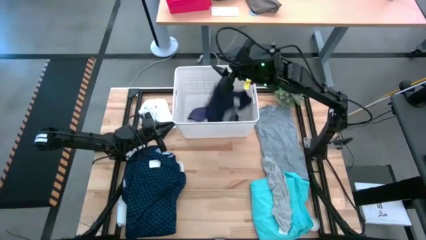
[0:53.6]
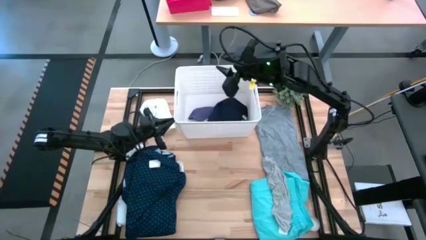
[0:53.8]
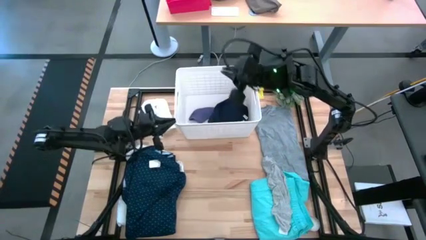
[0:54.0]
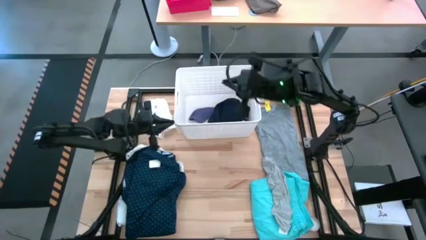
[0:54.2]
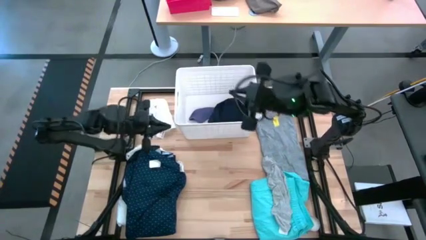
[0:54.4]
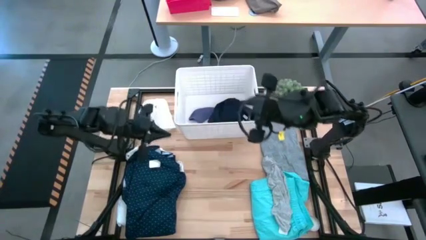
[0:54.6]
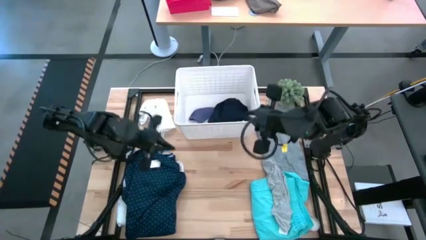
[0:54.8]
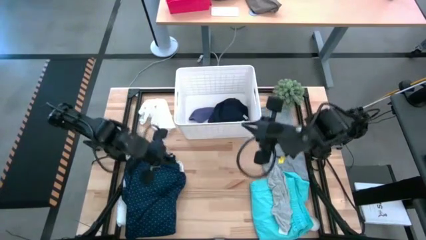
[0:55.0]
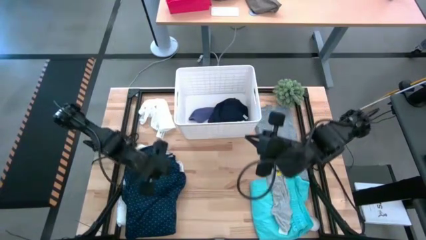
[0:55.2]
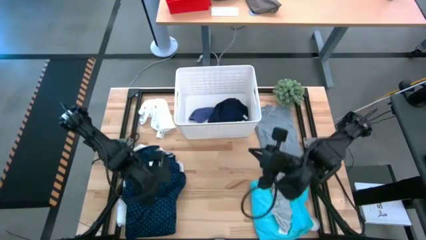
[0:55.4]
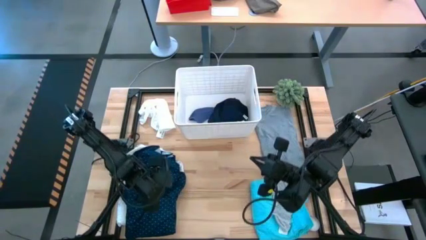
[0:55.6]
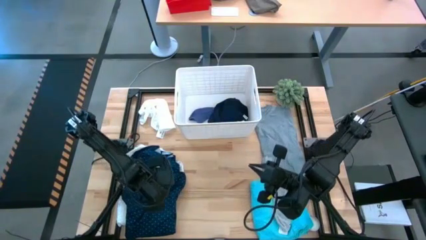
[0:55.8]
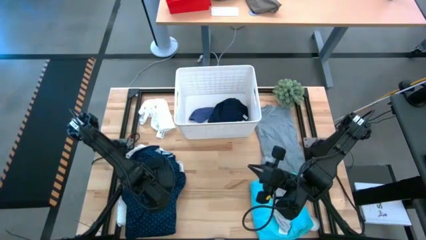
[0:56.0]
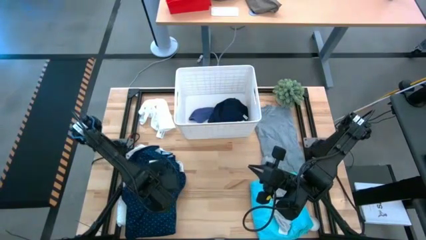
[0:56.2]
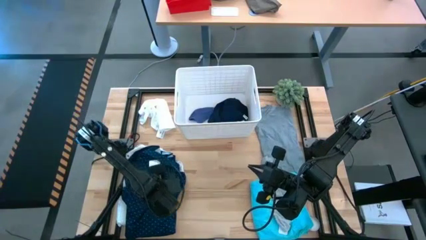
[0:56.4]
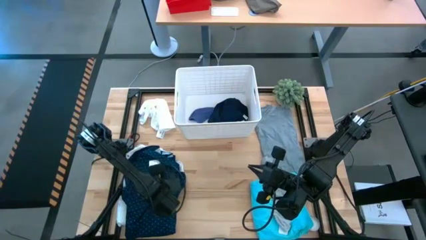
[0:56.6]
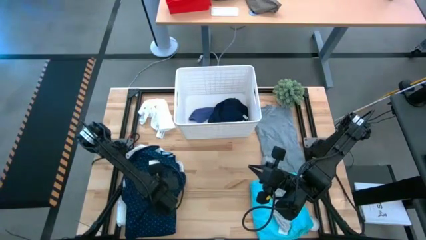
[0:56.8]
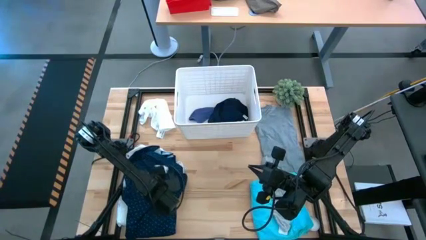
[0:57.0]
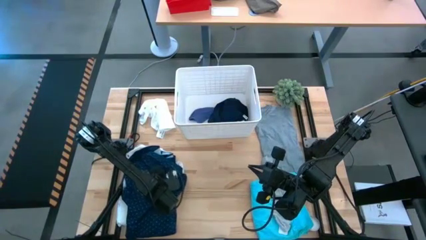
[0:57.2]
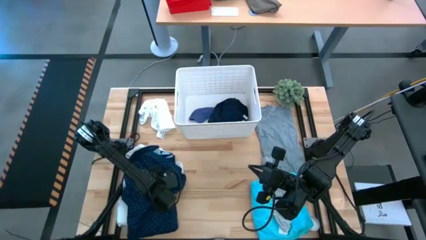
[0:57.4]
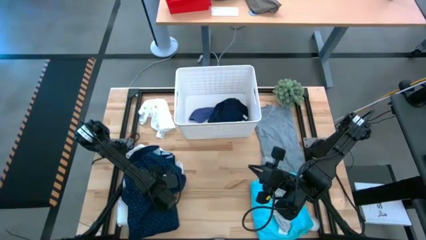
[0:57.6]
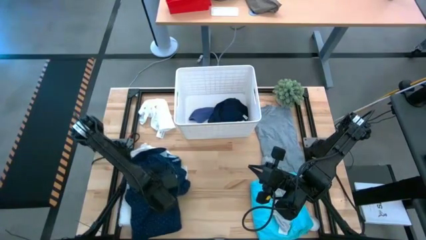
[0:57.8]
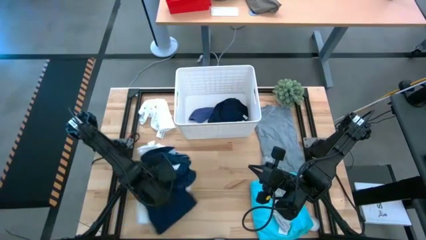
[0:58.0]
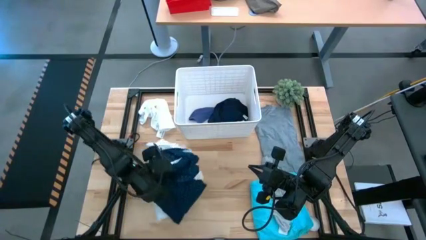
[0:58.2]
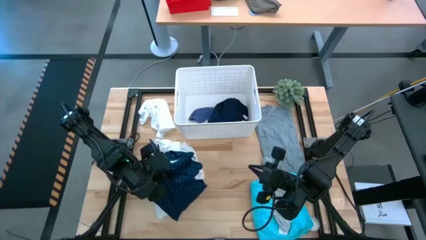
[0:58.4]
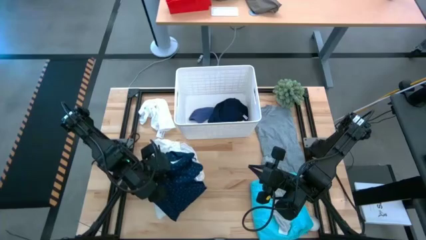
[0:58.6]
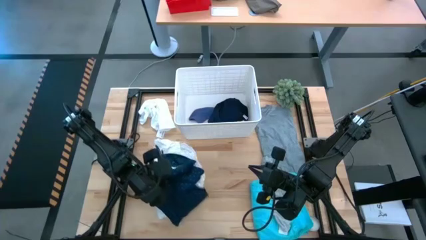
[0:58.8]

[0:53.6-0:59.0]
Task: Sort clothes
Put the blue shirt into the white laundry bin

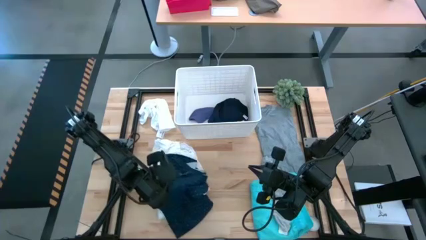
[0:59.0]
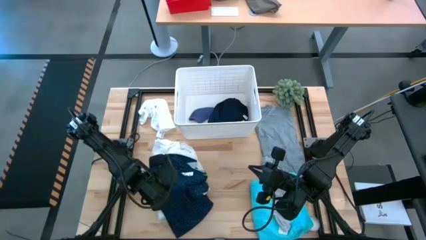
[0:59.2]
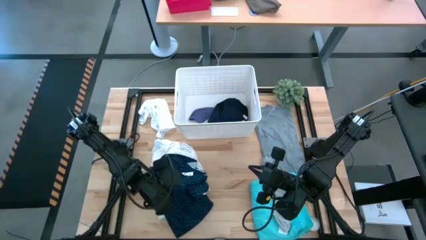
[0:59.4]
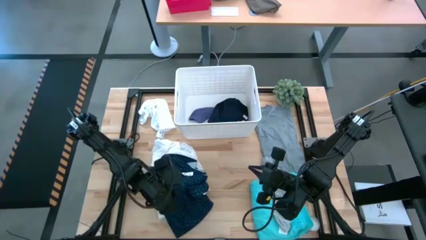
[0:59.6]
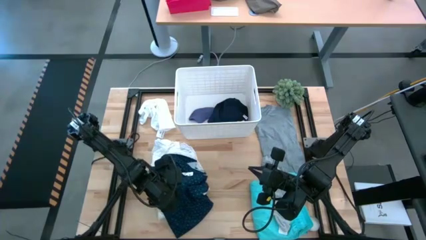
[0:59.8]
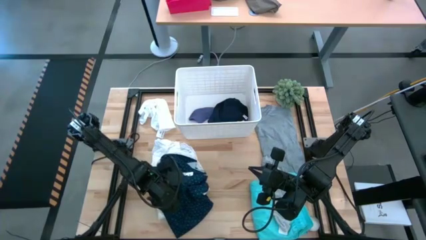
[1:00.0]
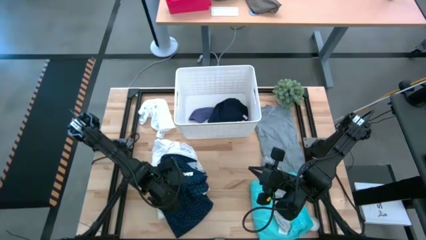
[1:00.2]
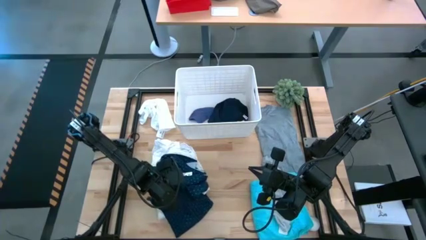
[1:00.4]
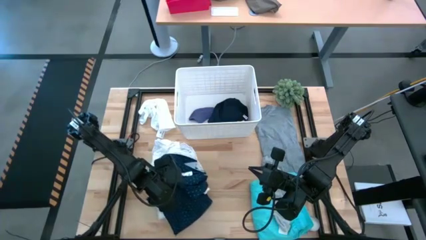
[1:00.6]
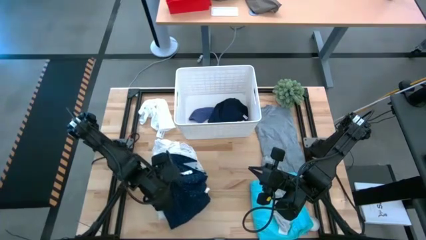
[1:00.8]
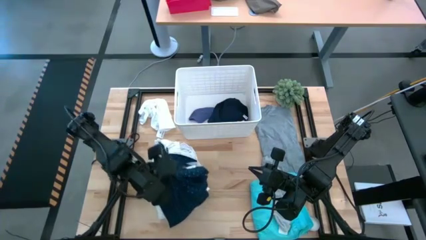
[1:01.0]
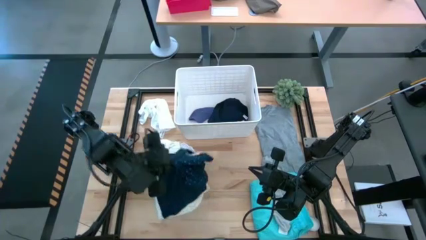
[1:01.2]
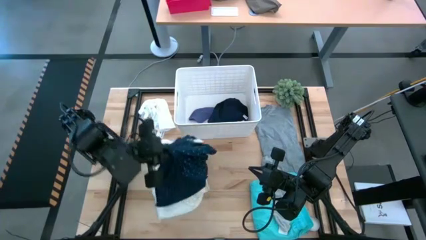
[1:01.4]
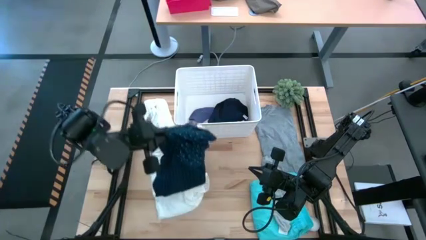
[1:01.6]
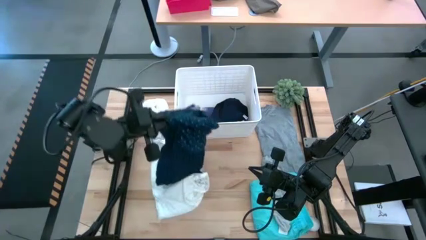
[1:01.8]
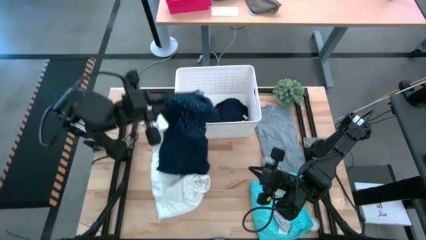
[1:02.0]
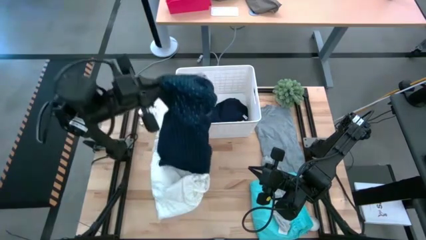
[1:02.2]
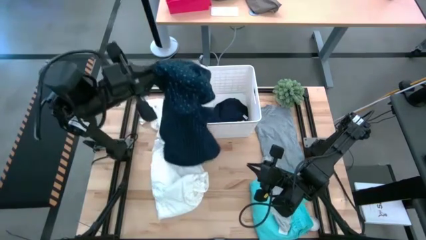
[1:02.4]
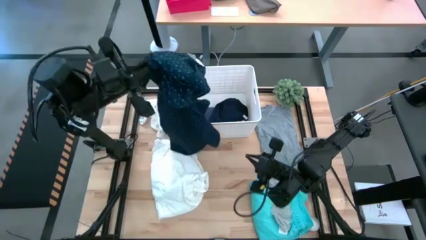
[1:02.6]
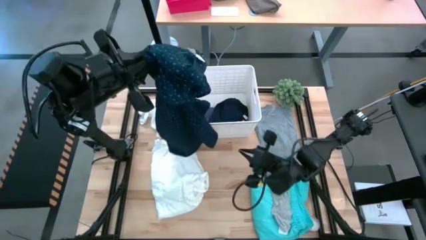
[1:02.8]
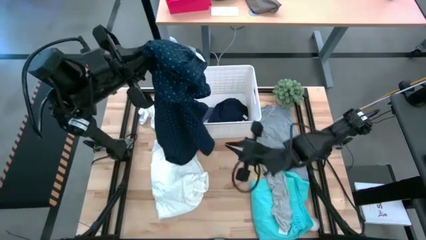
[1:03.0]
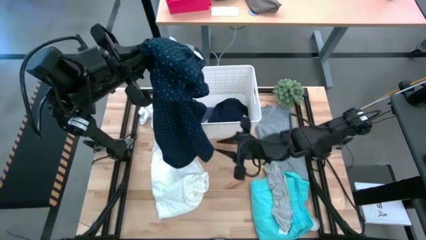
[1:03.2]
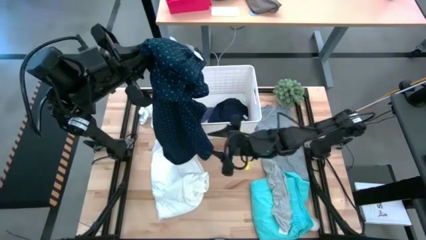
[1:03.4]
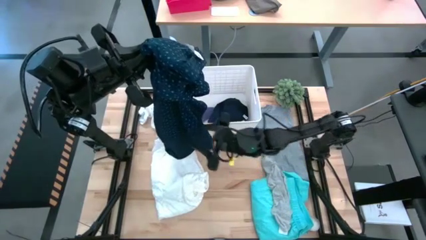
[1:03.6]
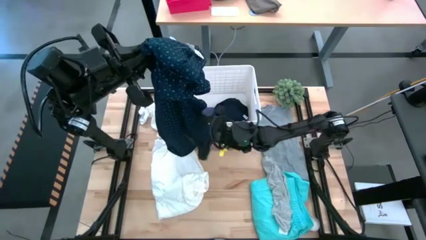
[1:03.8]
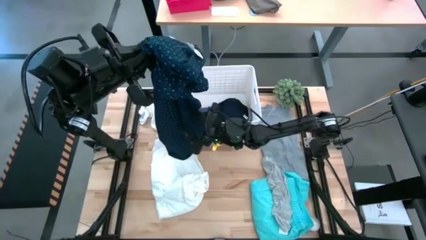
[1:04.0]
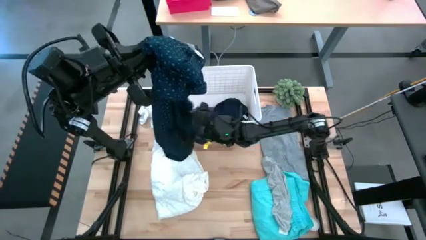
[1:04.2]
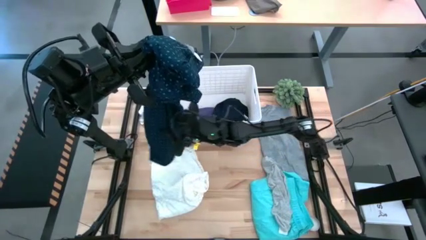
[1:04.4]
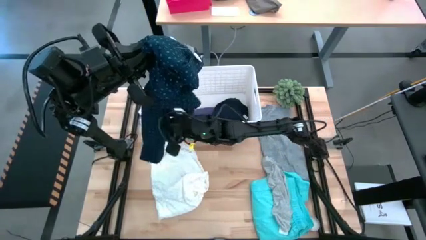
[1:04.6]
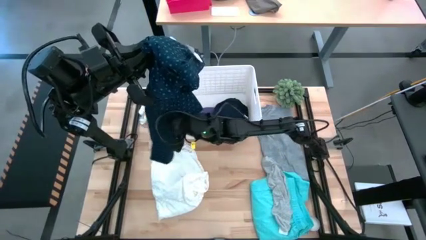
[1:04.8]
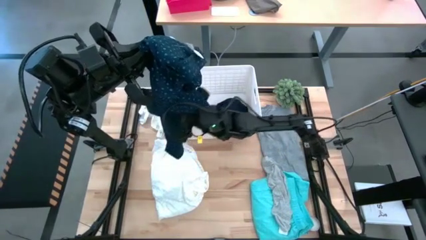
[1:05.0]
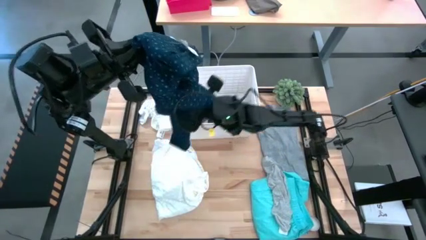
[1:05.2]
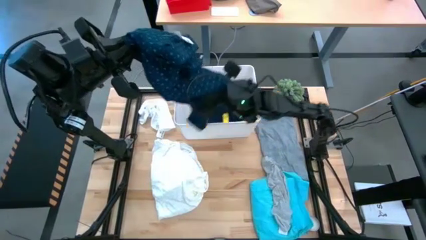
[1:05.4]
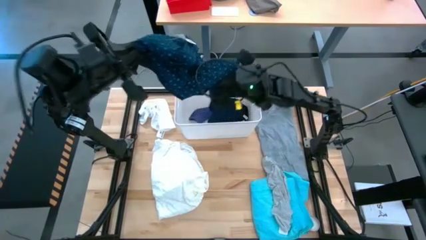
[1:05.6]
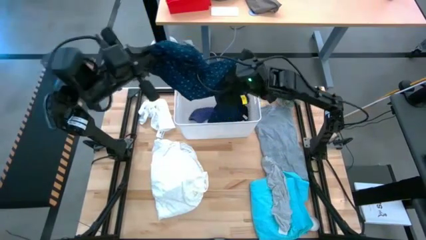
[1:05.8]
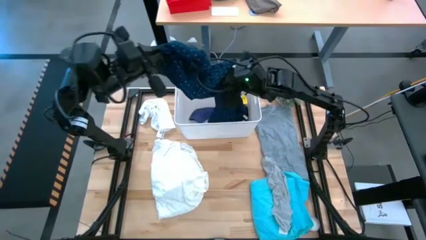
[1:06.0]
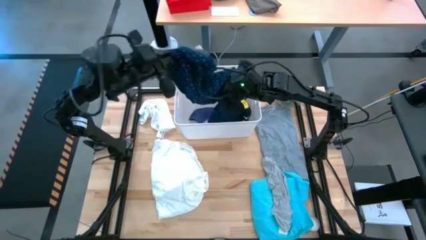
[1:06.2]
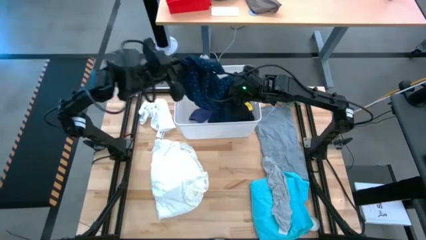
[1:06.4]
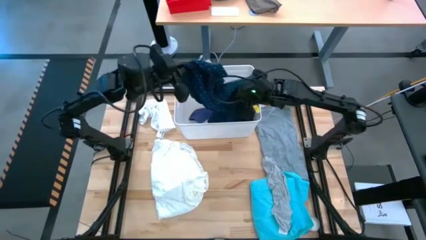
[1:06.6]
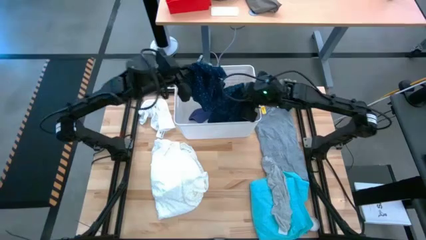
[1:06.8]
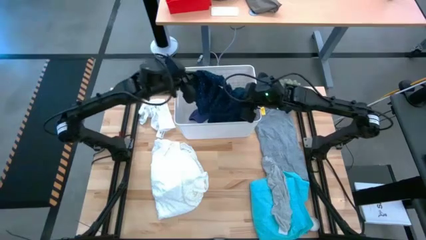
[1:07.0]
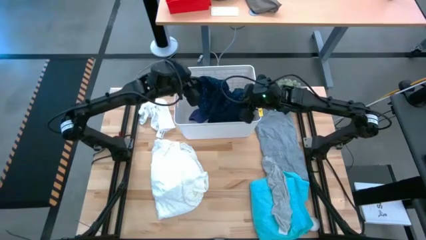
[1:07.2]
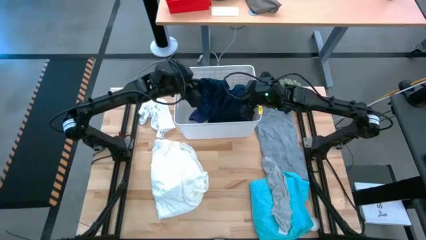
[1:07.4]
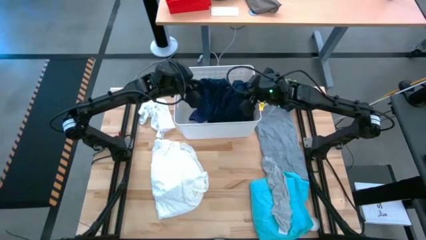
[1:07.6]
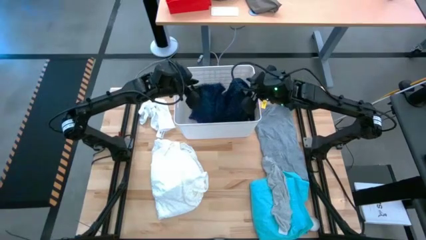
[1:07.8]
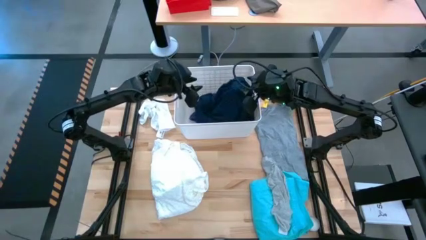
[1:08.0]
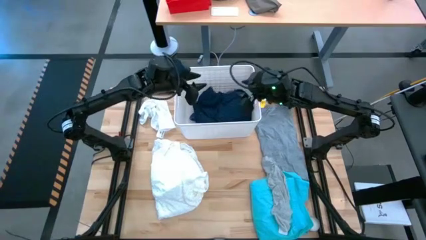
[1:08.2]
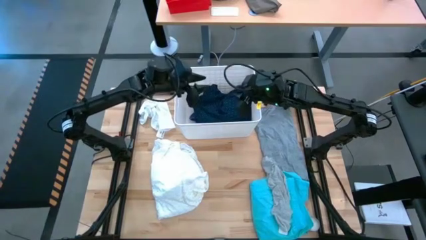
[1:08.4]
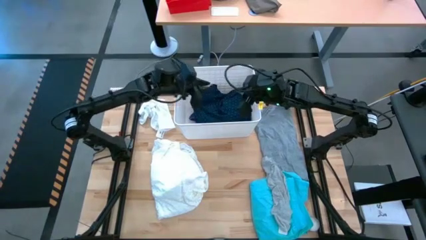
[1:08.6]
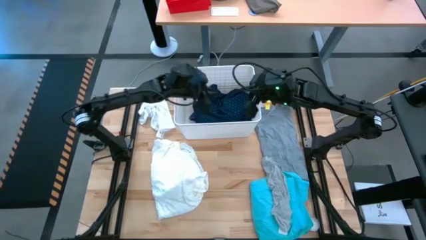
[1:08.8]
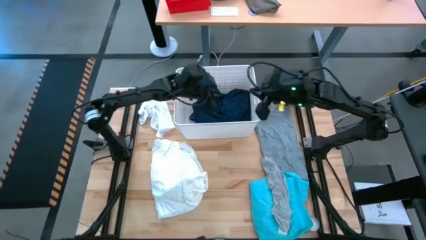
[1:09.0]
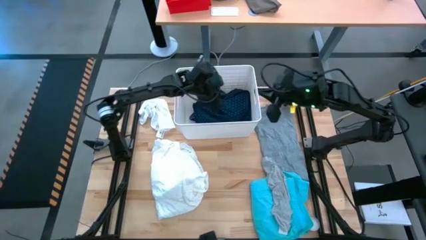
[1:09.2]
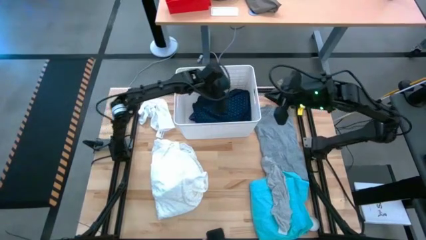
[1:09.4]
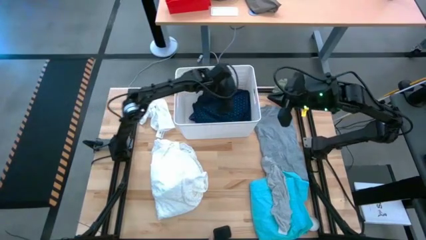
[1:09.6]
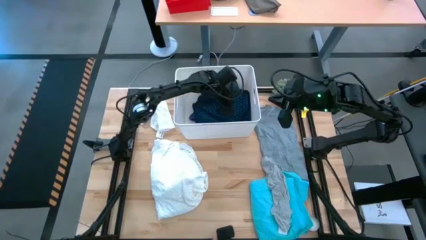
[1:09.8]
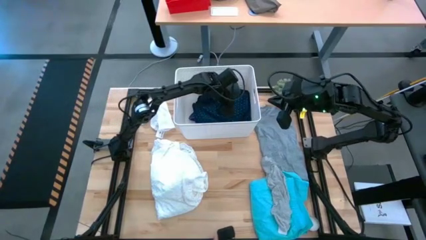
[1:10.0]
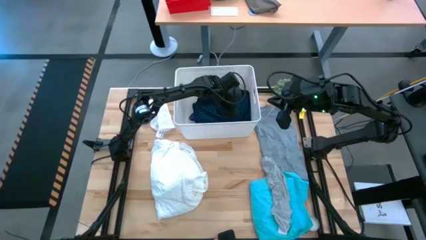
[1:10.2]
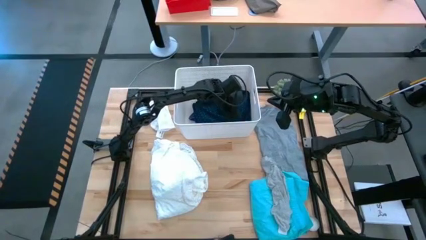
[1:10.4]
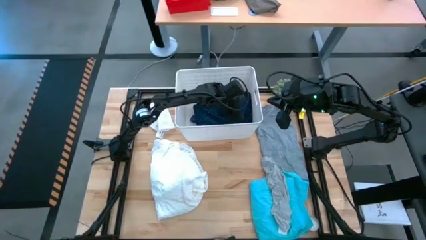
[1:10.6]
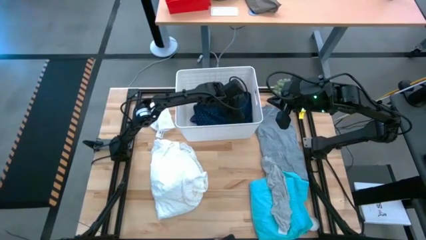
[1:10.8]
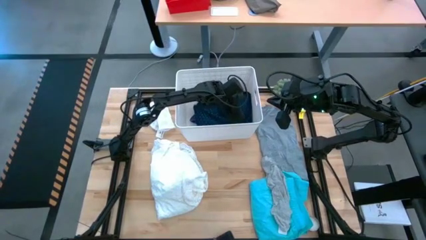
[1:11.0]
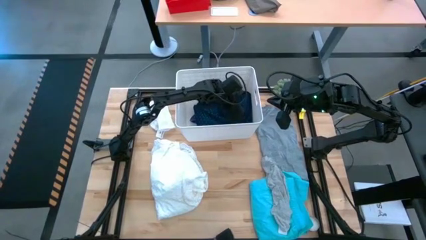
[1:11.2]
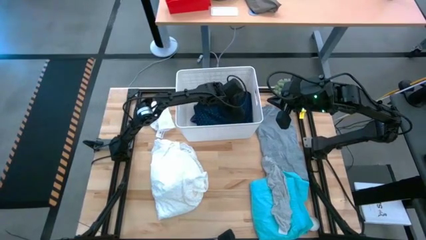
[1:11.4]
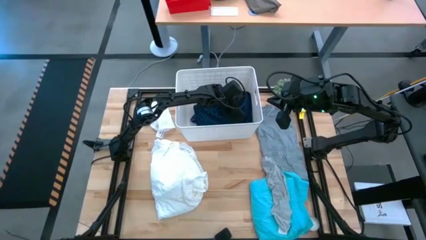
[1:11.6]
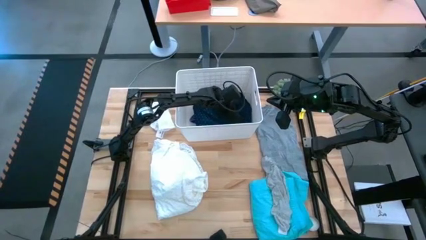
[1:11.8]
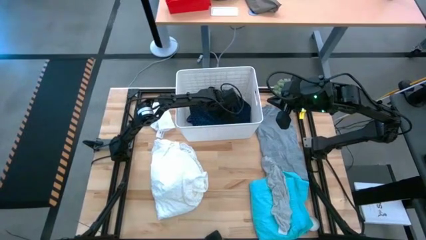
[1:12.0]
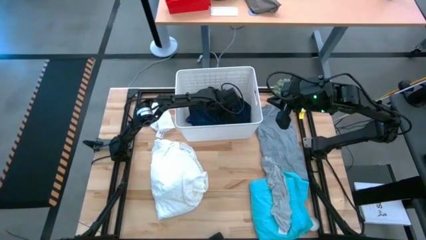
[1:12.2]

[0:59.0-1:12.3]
Put the blue shirt into the white laundry bin
